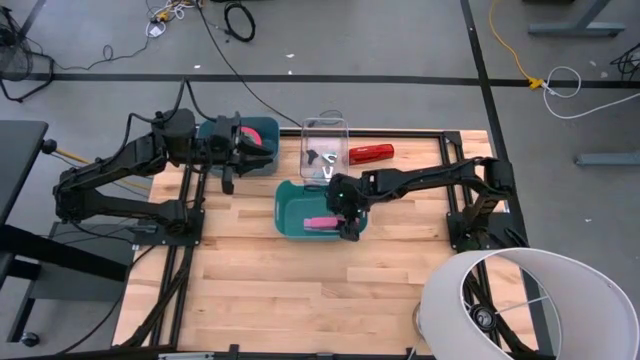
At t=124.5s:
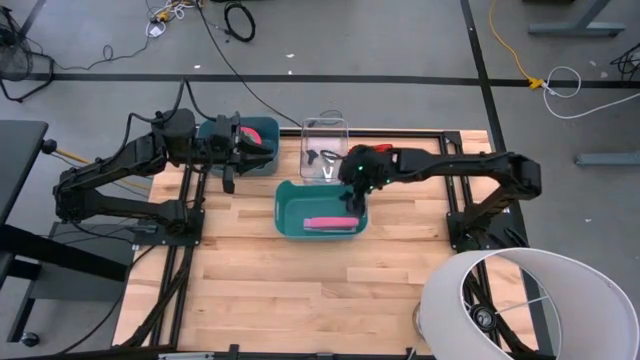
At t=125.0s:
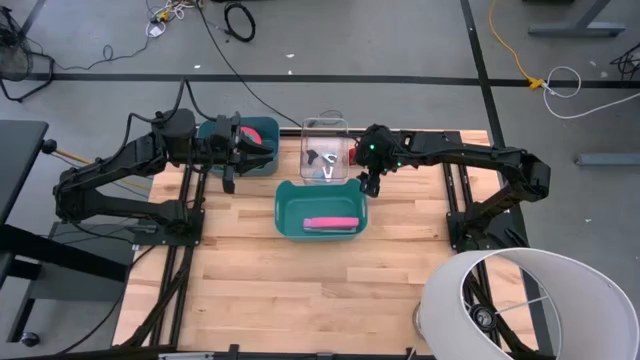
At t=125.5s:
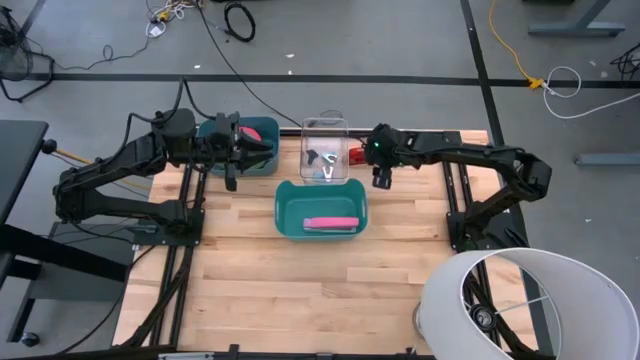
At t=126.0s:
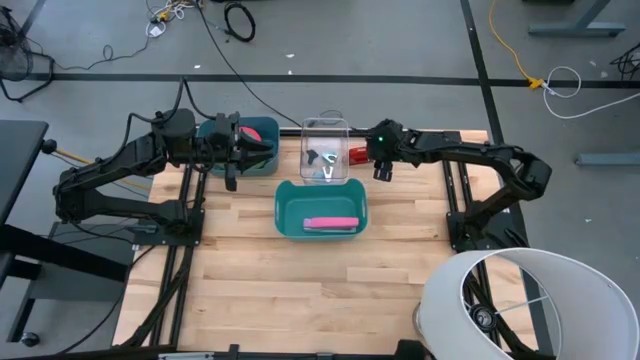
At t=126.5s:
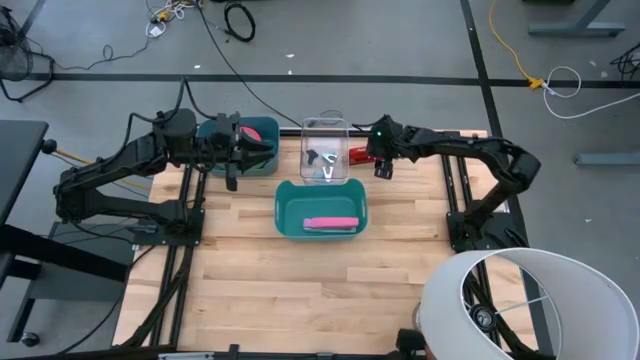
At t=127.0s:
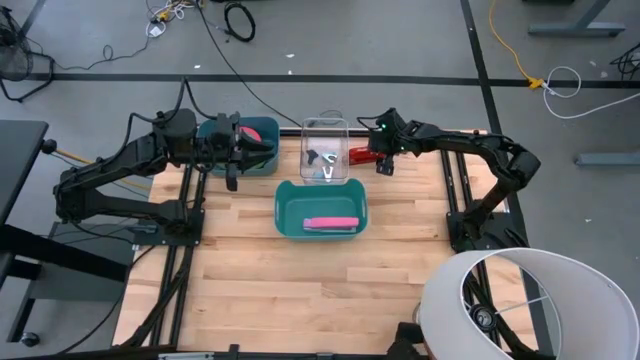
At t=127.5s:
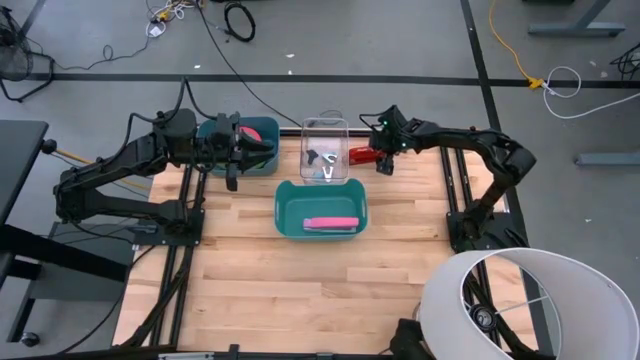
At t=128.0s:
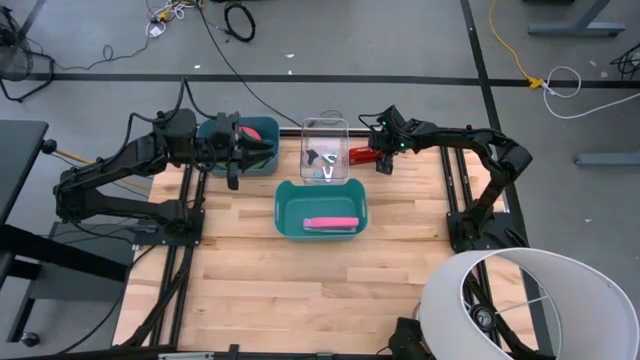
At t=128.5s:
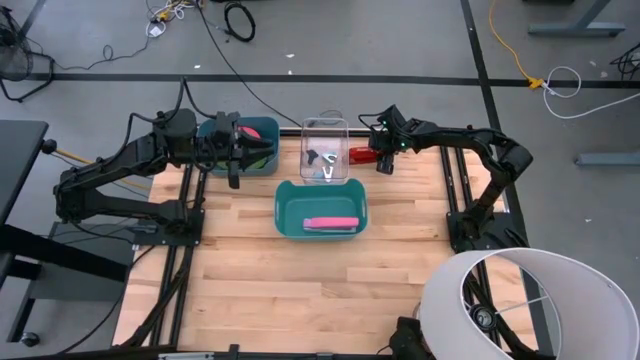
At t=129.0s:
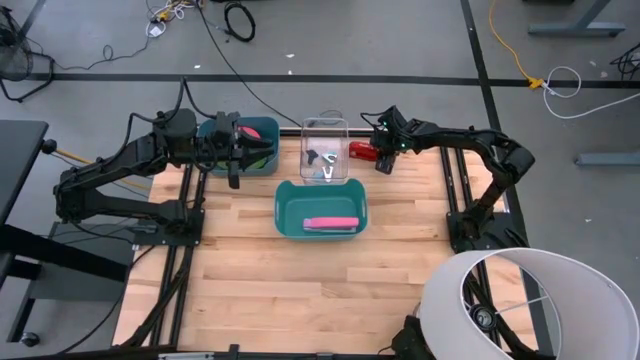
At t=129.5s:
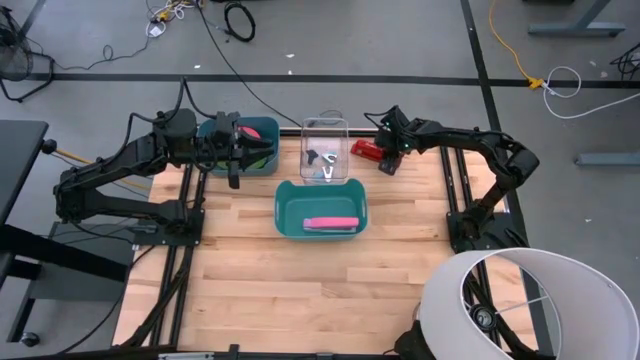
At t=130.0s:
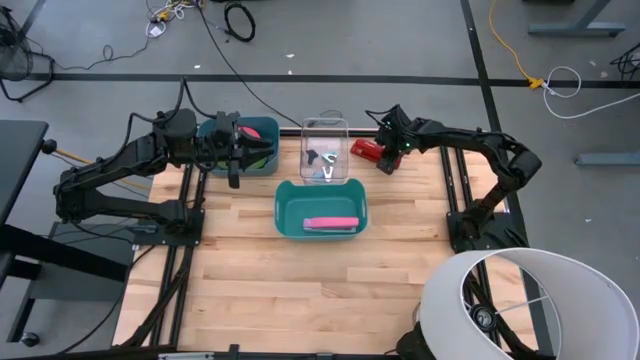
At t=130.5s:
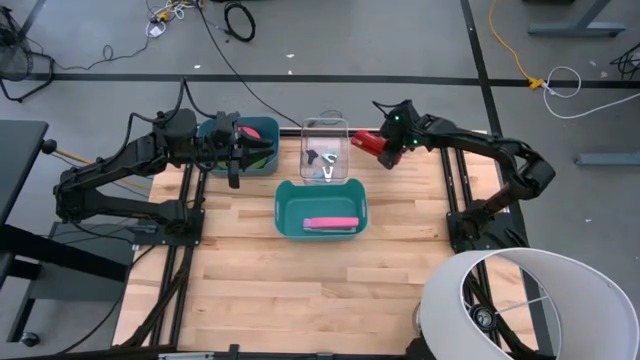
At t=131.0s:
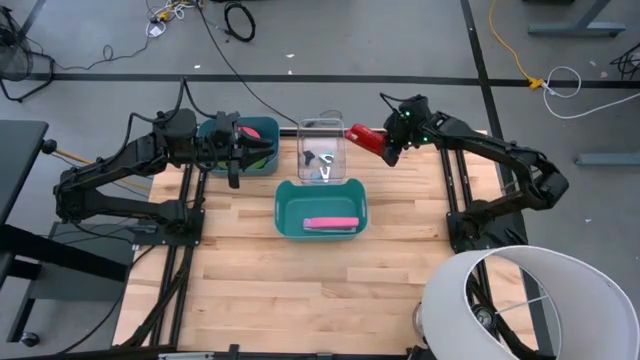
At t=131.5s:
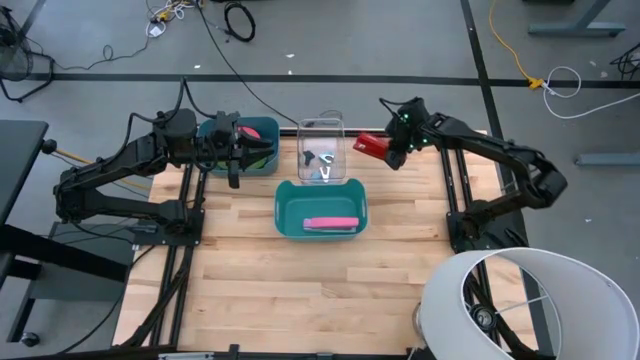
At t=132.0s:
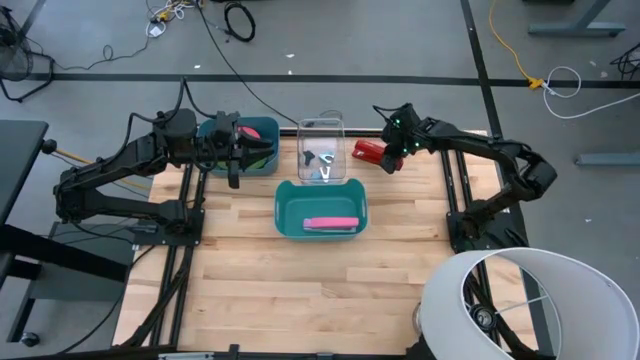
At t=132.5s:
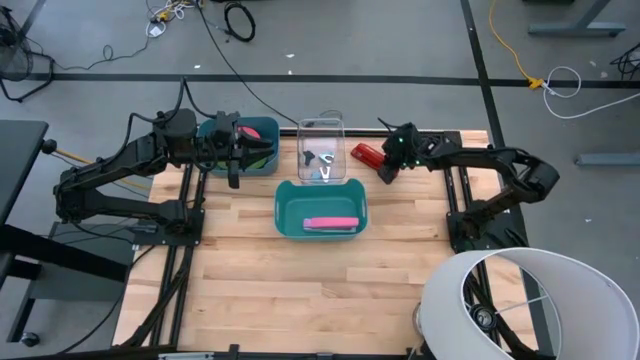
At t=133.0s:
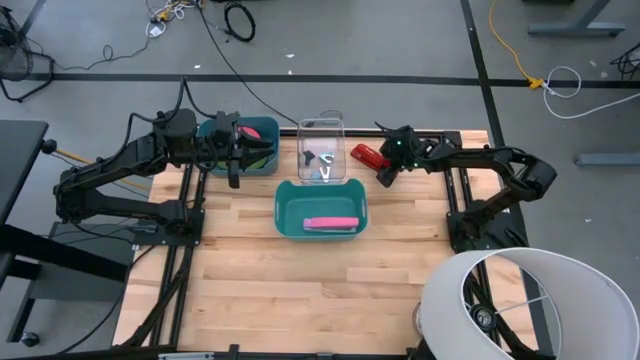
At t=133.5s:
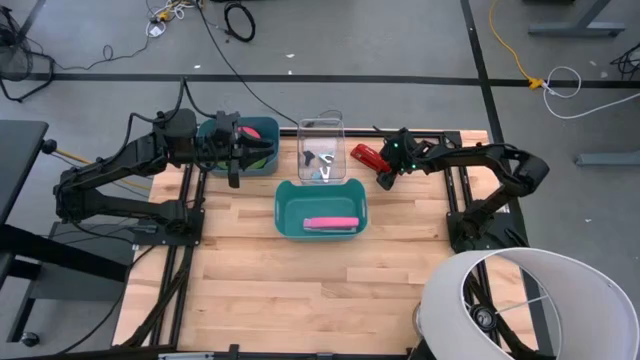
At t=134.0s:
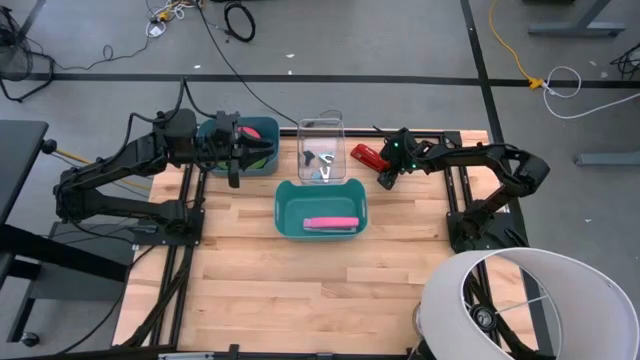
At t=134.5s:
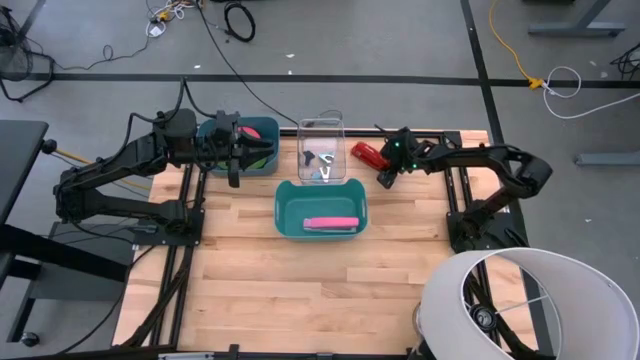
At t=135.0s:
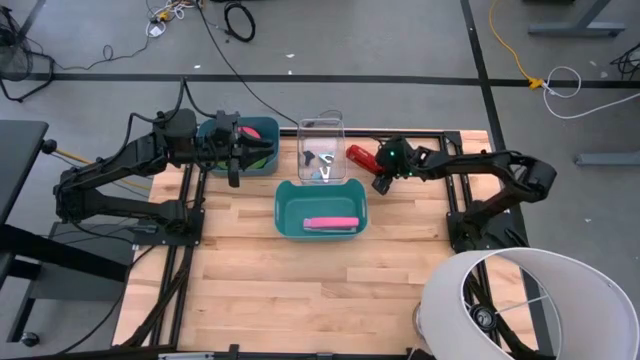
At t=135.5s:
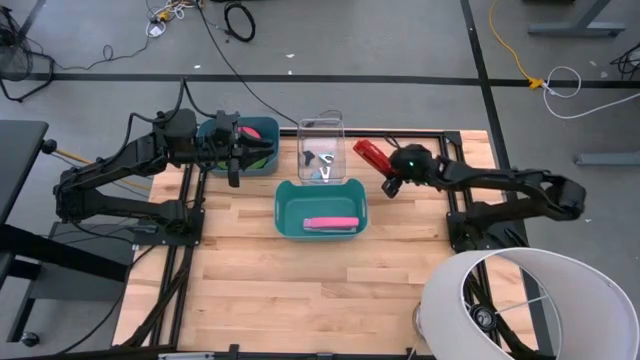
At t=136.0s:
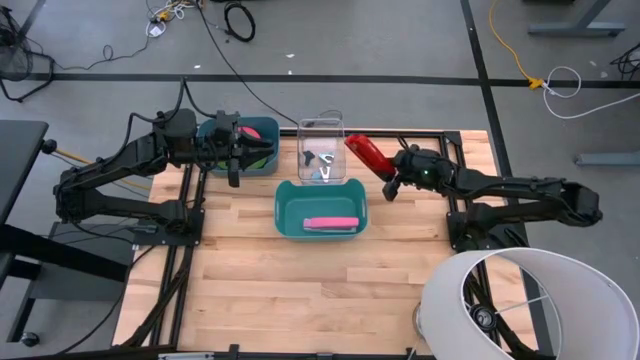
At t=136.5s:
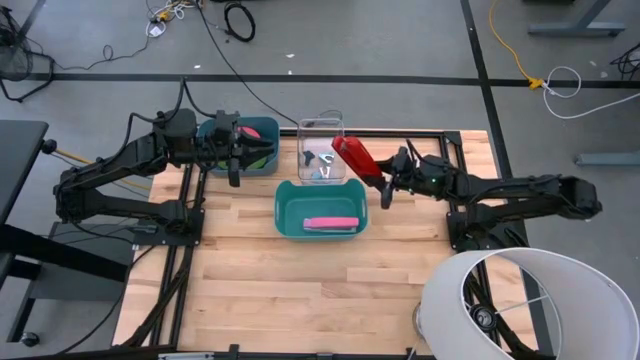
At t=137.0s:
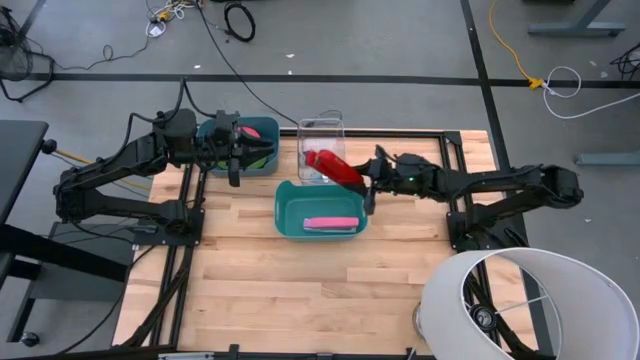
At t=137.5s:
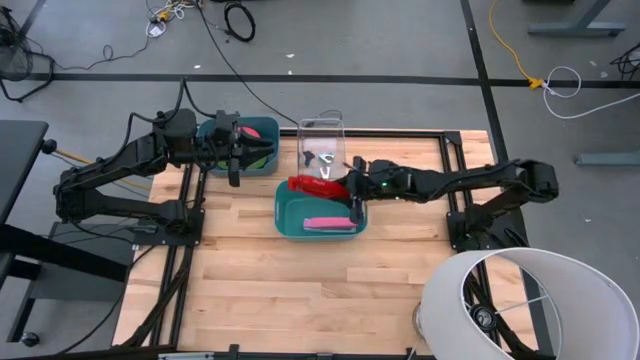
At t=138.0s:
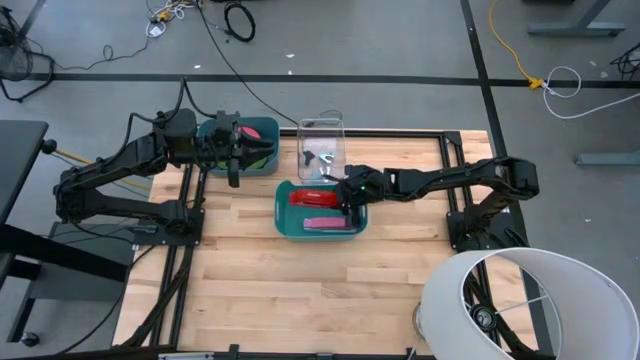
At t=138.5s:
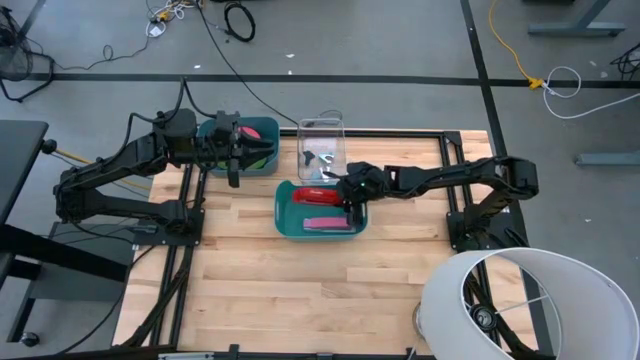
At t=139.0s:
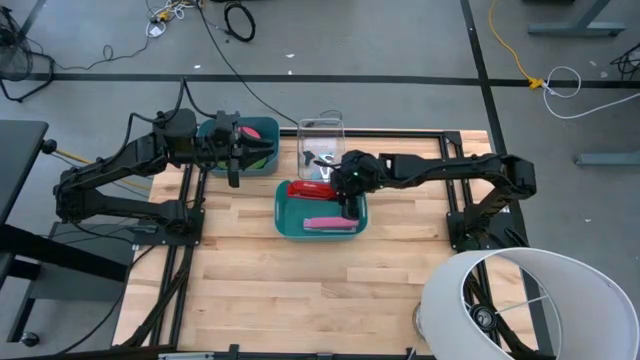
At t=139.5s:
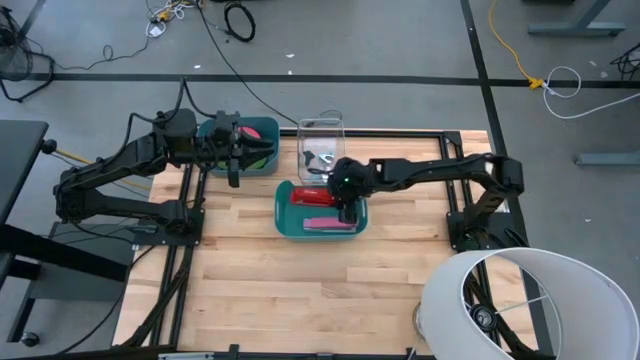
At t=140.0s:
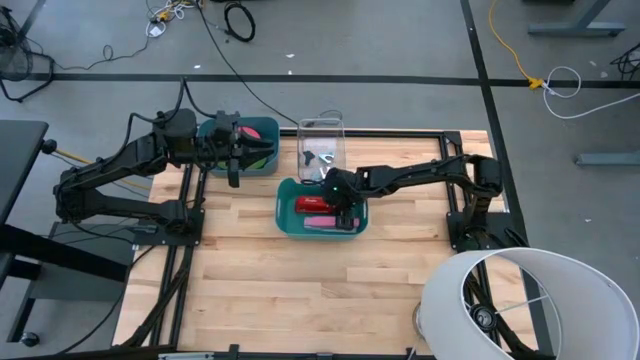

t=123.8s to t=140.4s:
Task: Pick and place Stapler, Stapler remover, tape
Put the red stapler into the green bin

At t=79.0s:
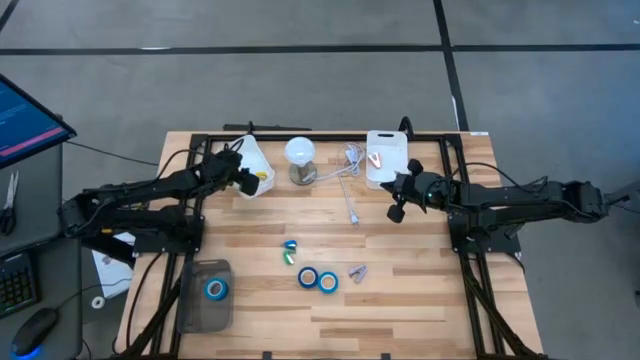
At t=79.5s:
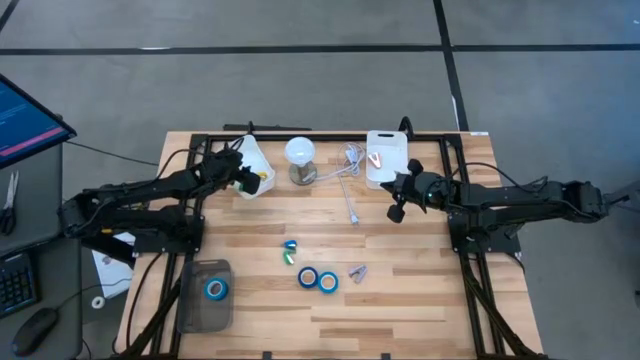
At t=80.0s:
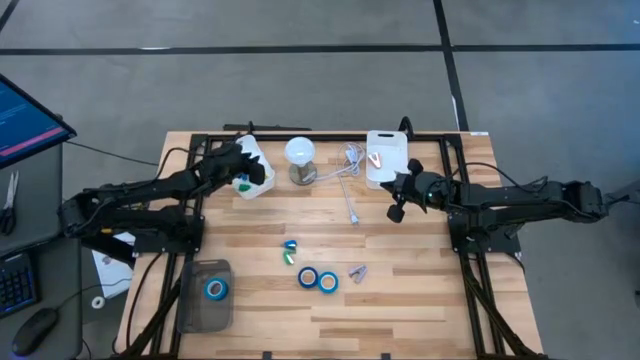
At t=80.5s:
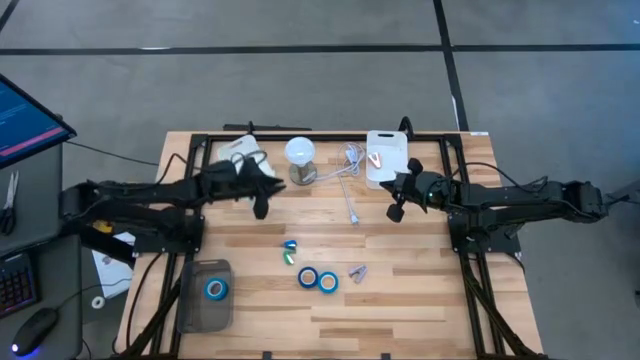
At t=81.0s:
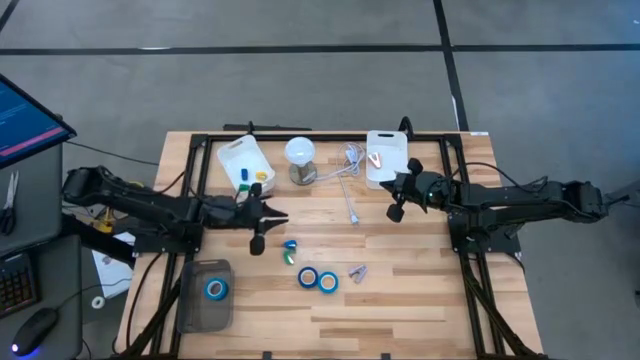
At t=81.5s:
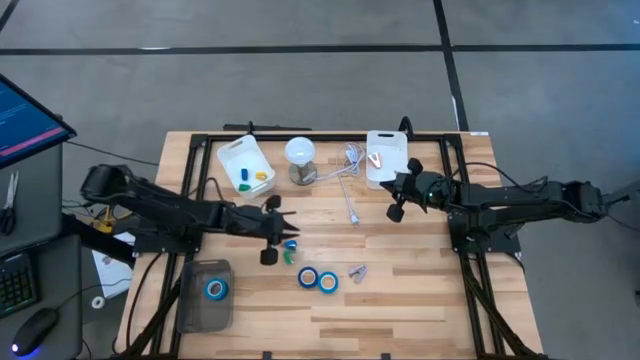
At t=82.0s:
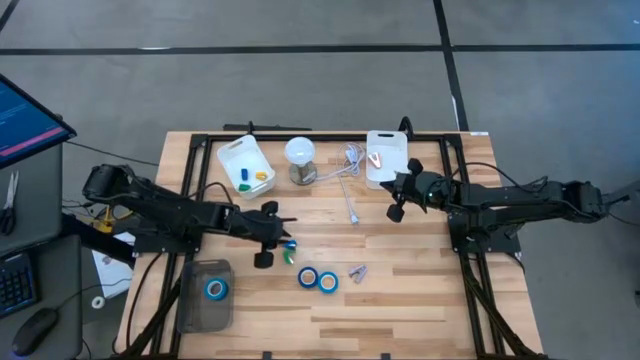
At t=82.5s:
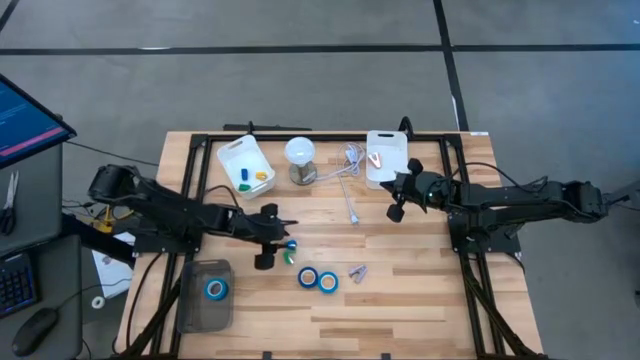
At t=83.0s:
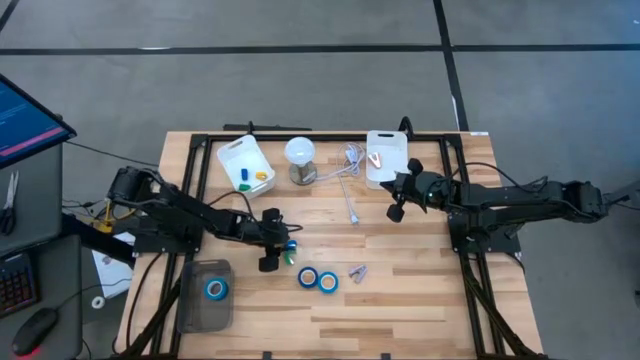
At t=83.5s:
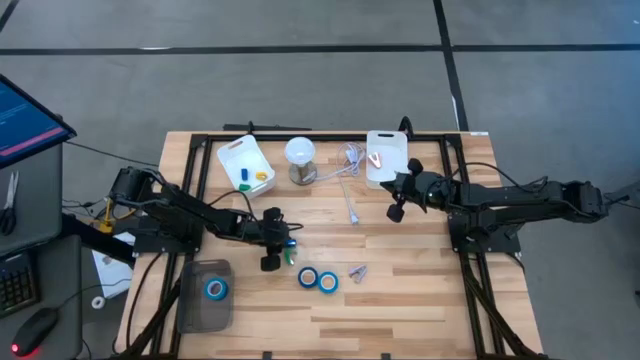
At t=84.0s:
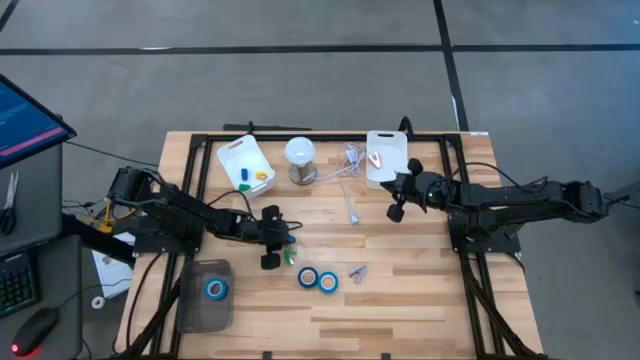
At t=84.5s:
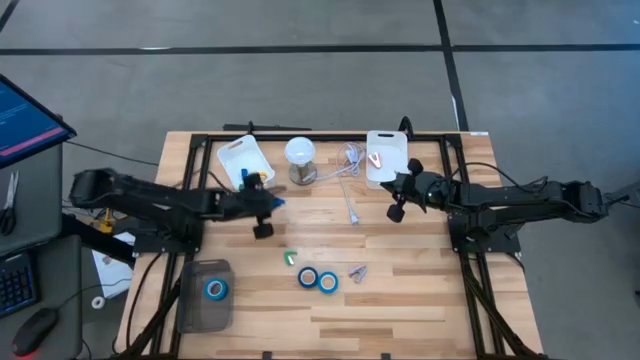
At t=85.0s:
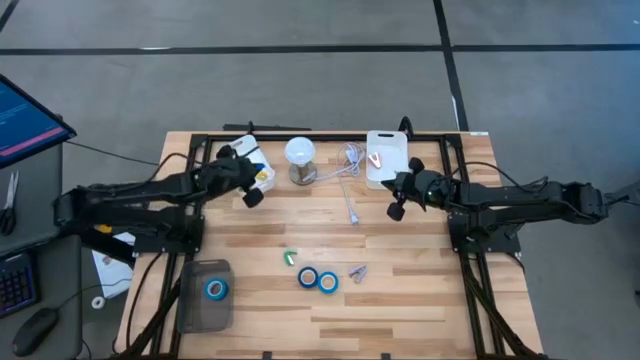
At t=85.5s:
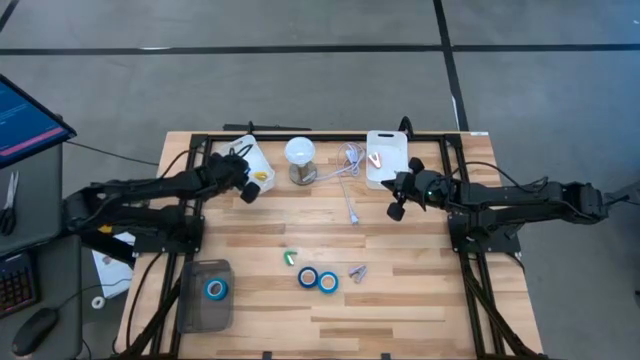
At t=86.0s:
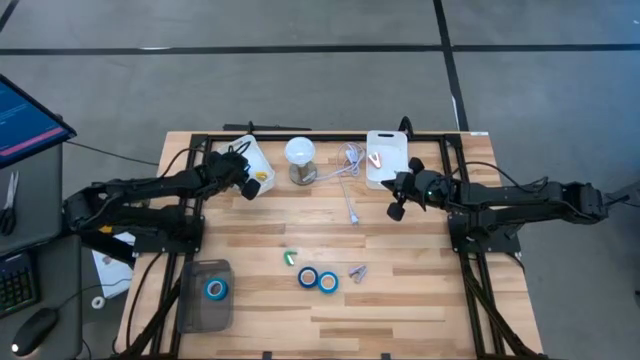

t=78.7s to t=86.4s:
Task: Pick and place Stapler, Stapler remover, tape
Put the blue stapler into the left white bin
